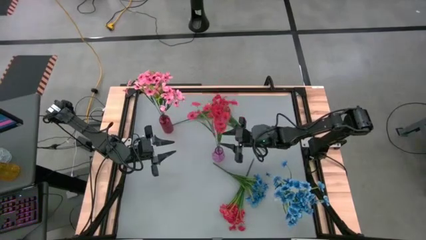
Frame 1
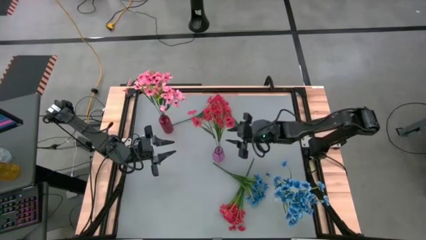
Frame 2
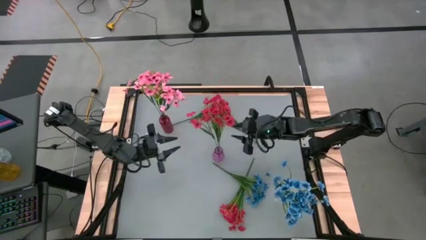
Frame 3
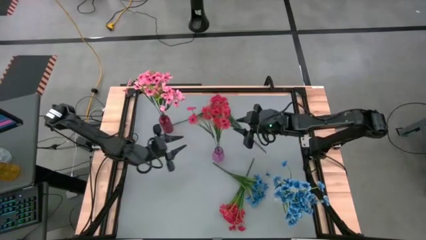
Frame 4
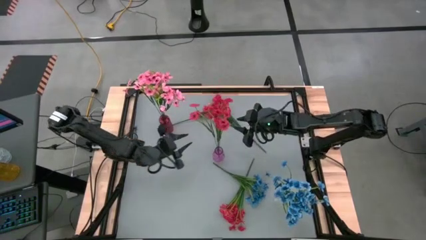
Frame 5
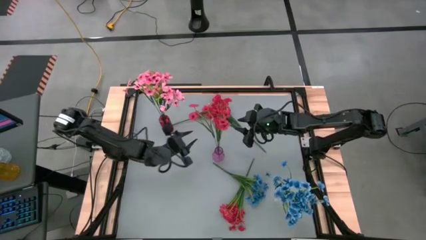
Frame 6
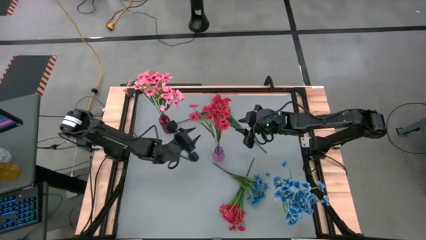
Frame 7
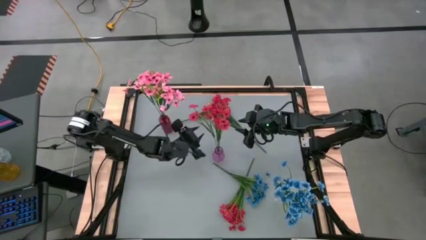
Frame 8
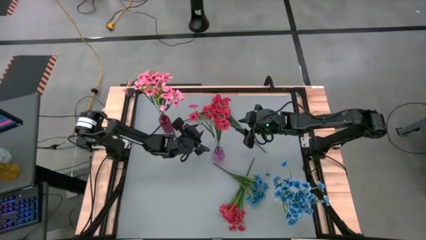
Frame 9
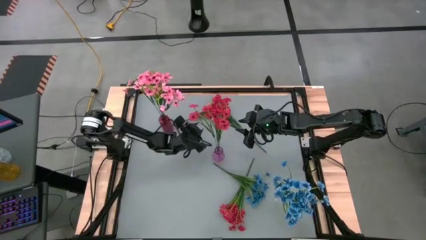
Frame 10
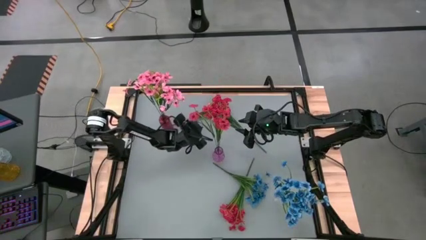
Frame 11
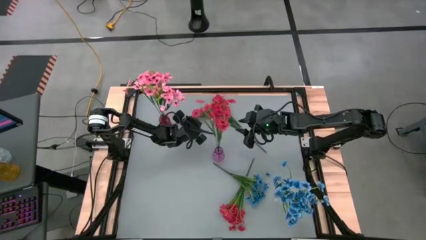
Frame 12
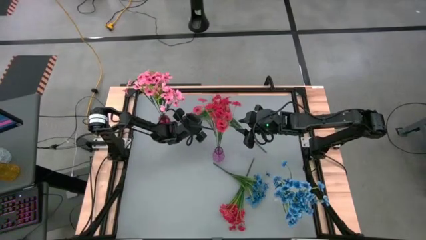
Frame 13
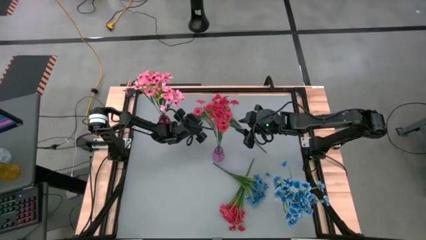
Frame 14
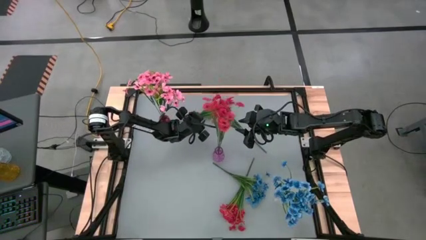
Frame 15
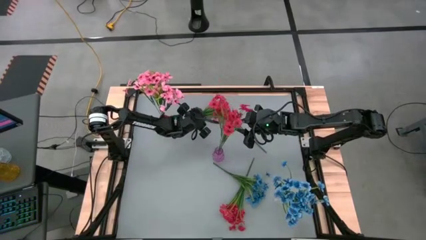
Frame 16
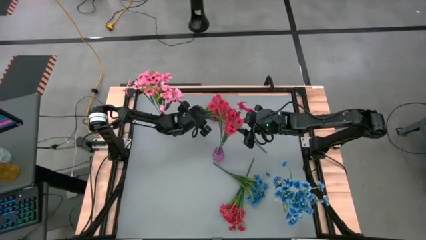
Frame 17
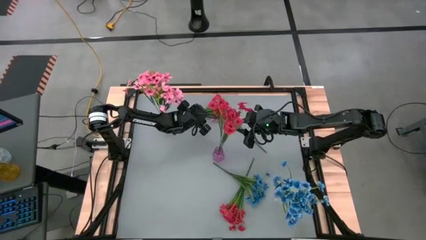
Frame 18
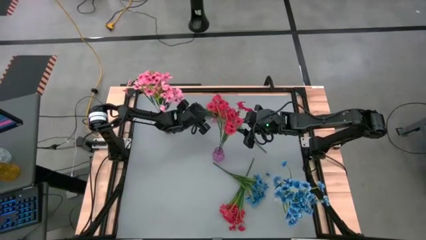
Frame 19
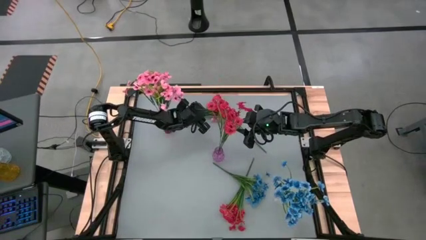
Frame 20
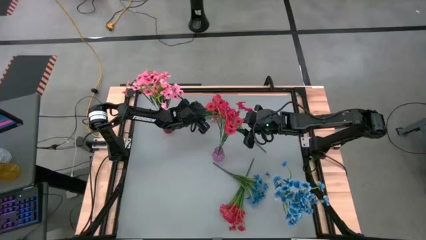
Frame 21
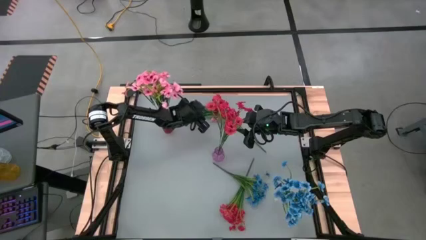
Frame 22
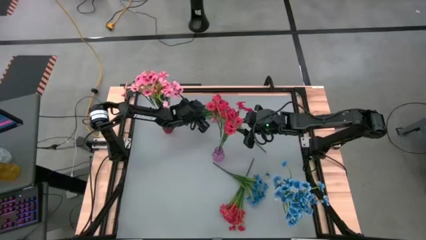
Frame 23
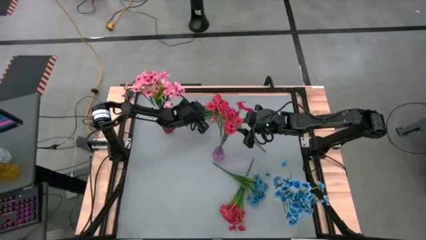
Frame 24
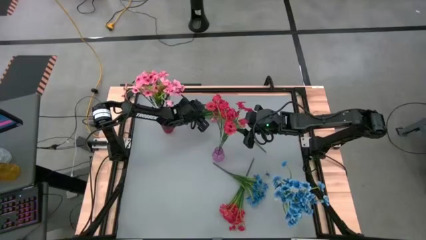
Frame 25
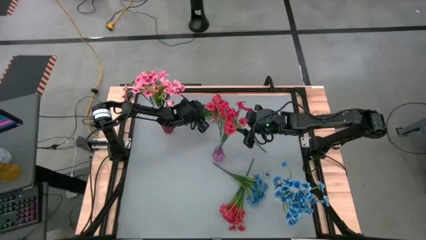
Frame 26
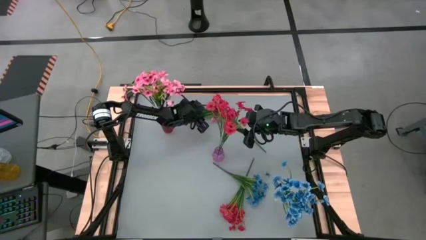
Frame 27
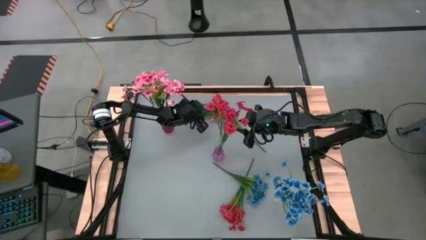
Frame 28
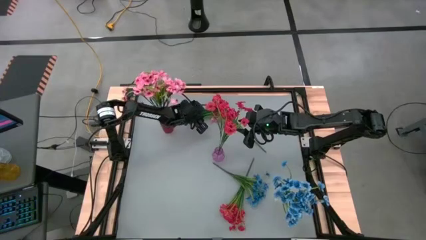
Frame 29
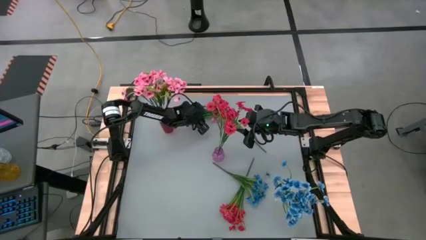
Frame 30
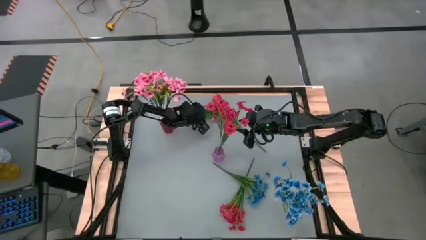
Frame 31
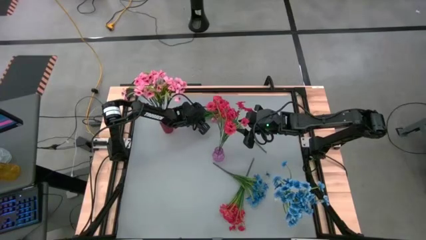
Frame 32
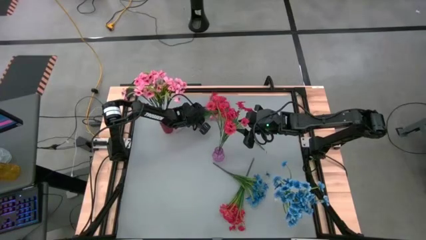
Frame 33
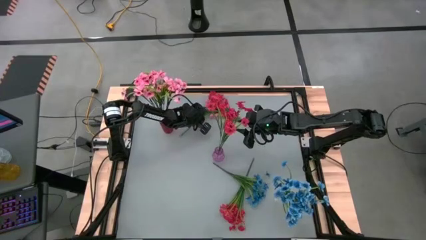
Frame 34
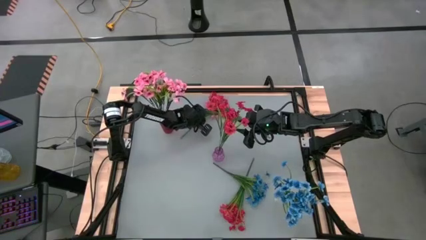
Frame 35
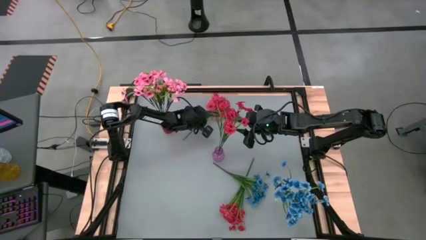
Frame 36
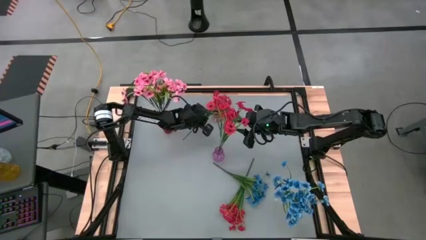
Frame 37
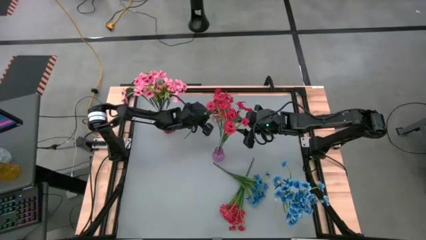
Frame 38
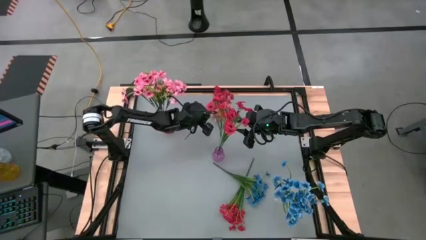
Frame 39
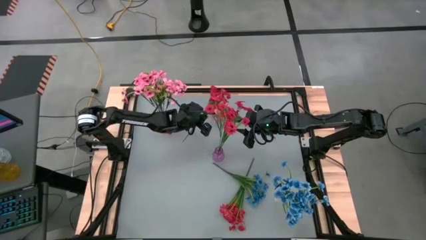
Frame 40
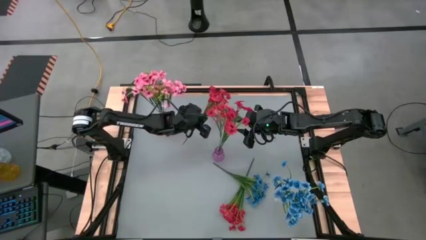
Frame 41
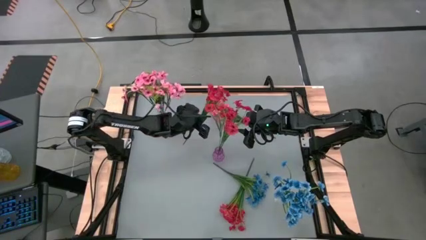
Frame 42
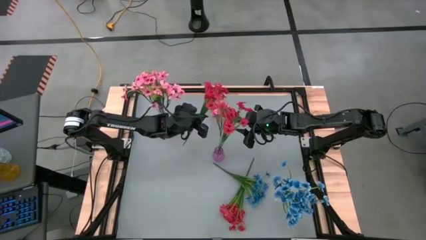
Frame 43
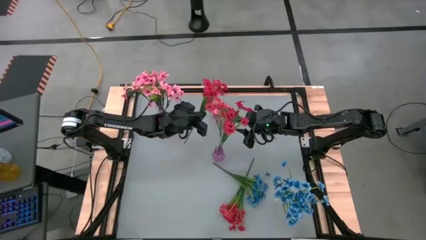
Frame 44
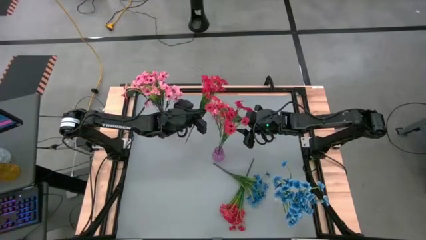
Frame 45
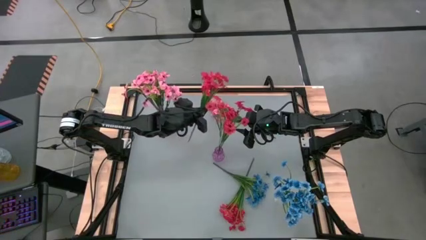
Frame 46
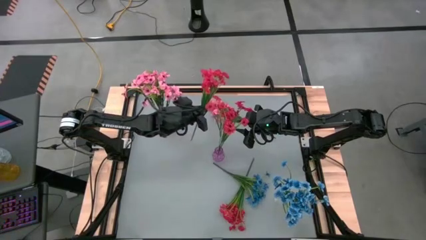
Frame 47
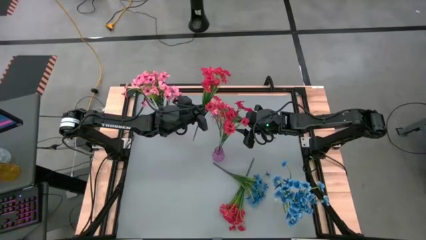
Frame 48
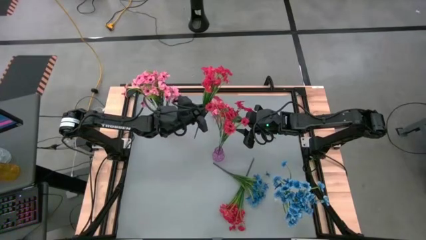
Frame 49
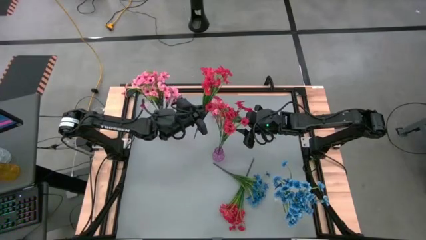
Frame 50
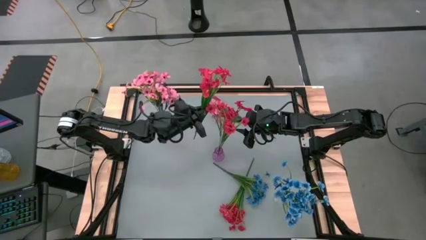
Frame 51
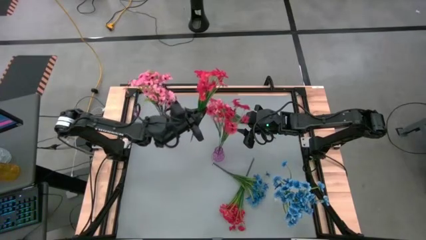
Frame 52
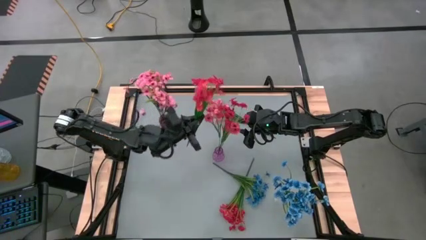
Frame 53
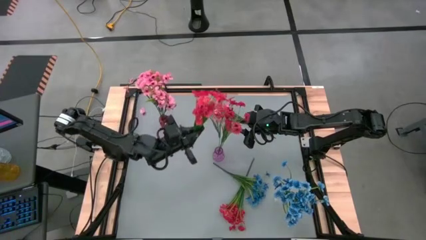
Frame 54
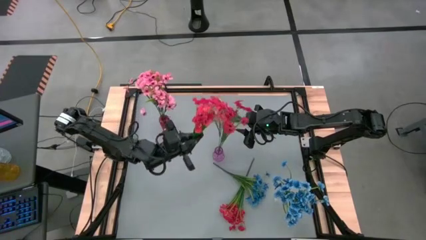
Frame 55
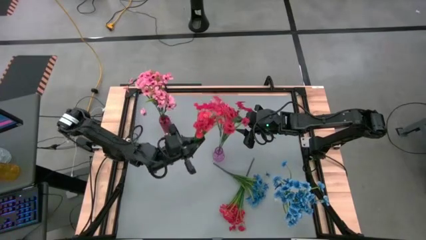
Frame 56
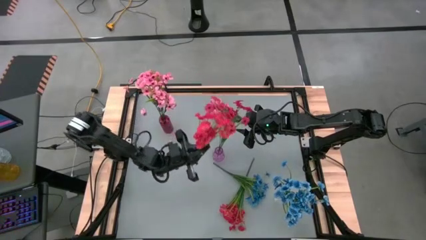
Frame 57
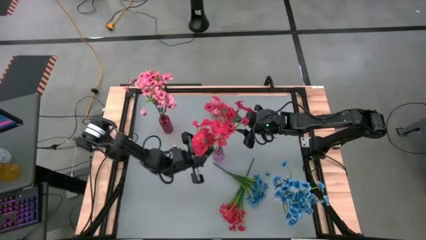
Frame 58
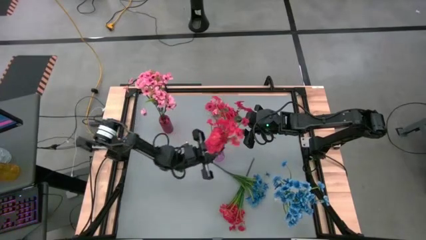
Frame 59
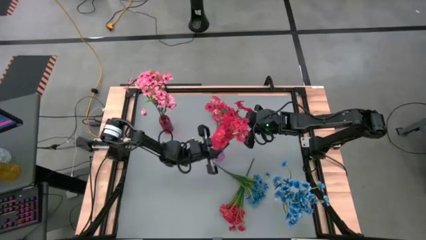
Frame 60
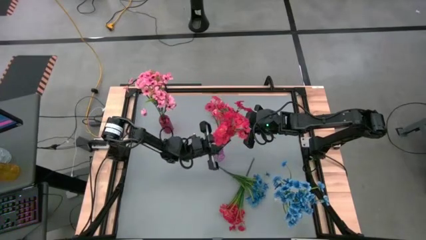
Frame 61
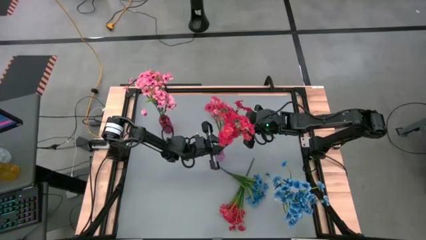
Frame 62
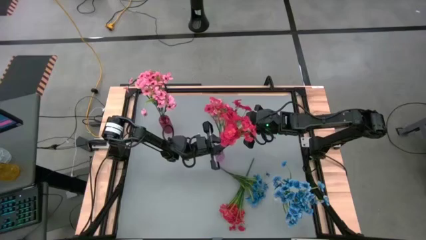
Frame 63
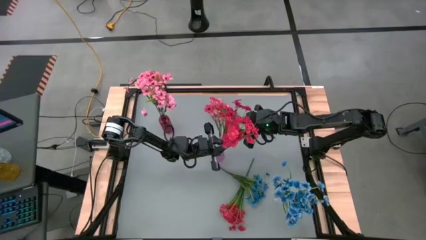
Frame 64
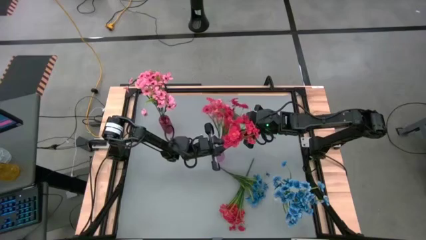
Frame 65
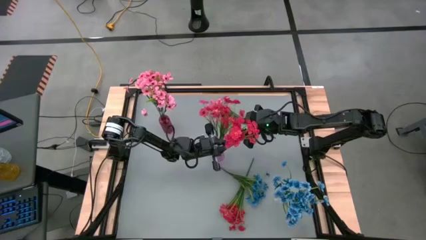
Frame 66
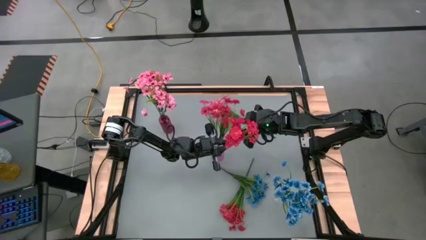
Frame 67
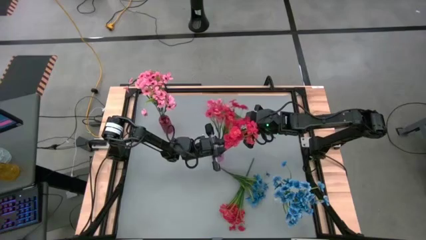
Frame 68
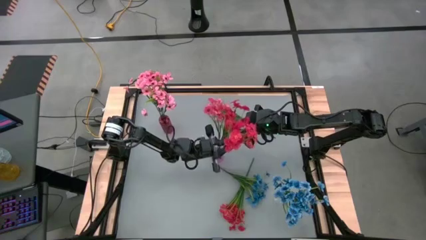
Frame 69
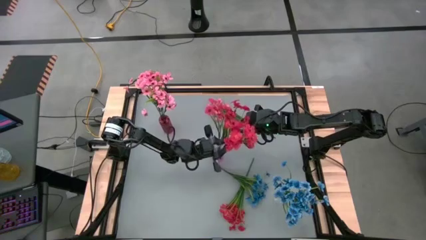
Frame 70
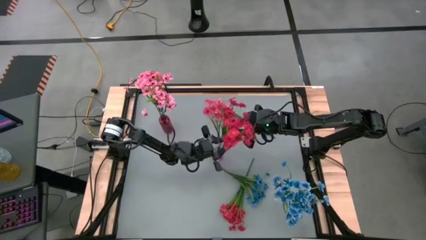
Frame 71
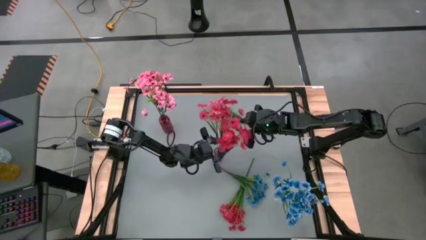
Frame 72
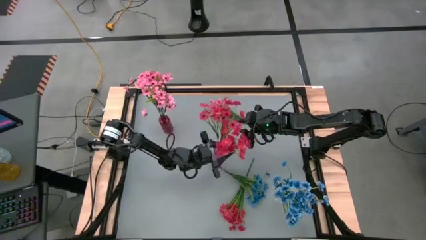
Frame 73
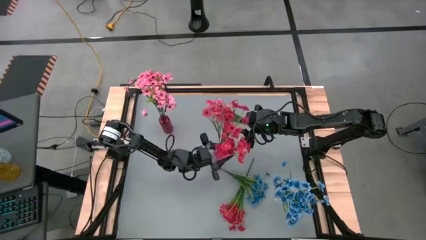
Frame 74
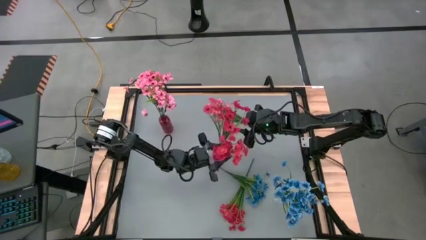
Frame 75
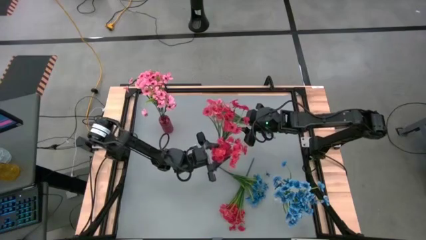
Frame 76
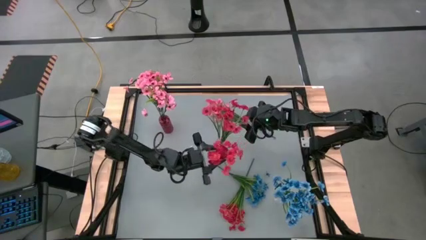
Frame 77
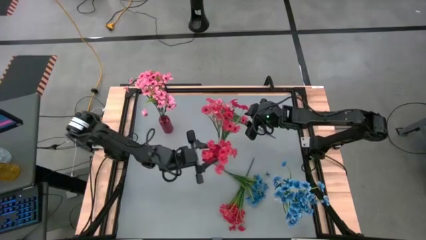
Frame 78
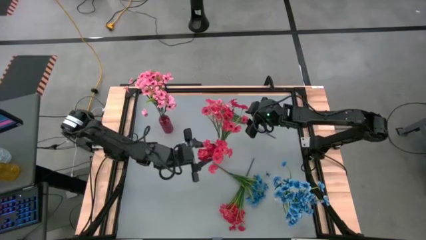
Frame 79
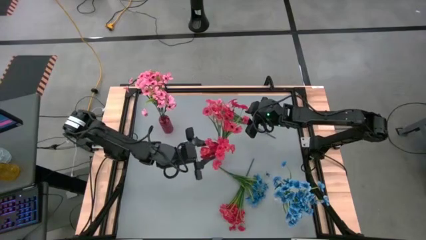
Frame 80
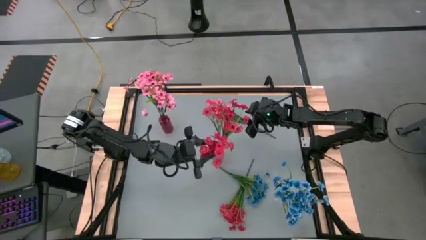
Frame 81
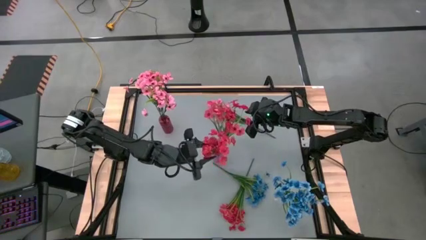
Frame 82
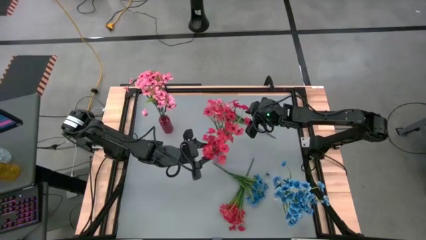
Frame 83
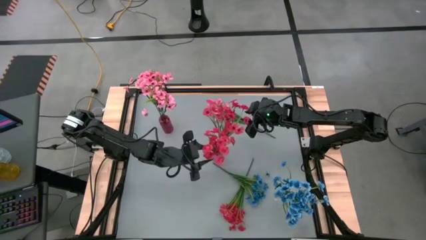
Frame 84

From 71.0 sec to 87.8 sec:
Task: Sort flowers into vase by color
Put the top red flowers into the purple vase
